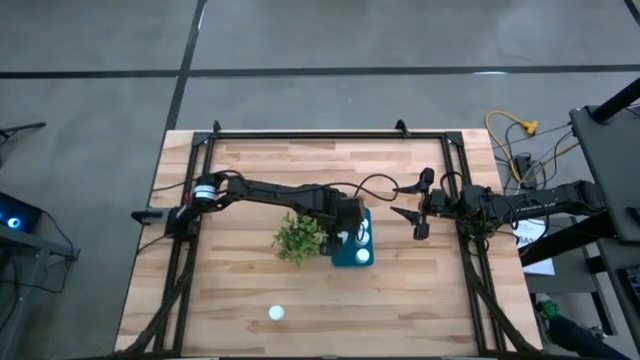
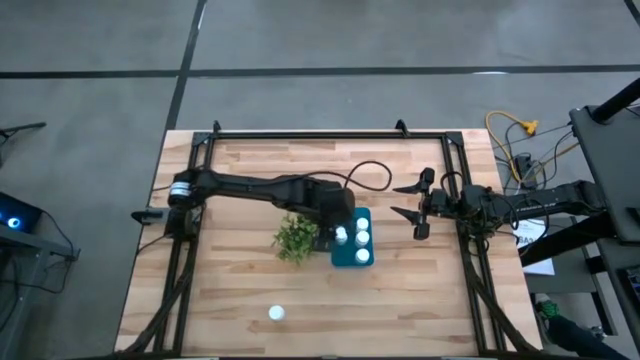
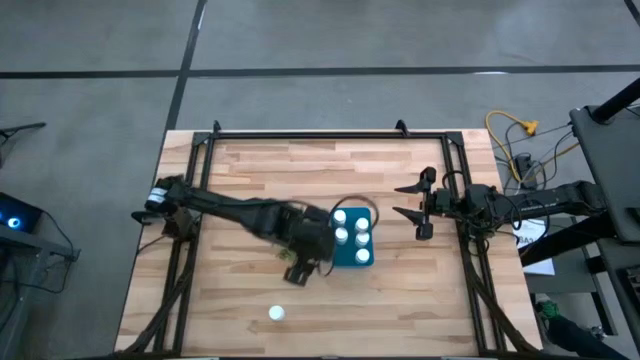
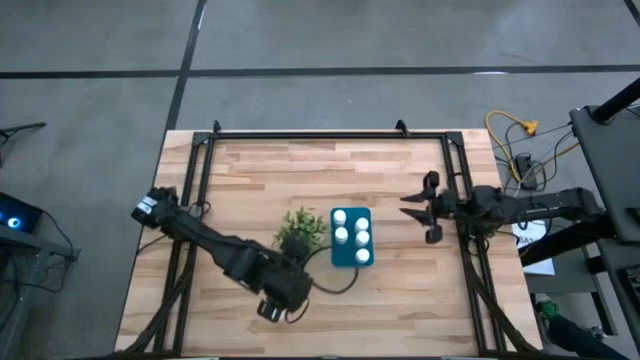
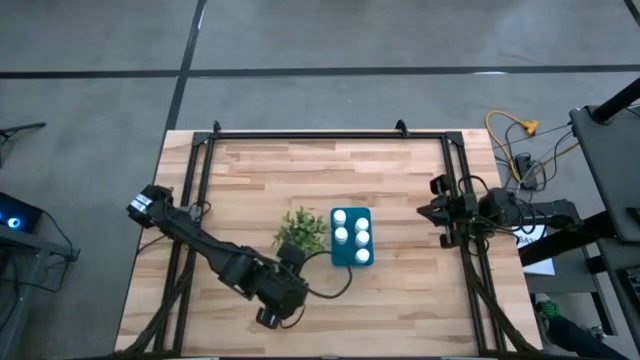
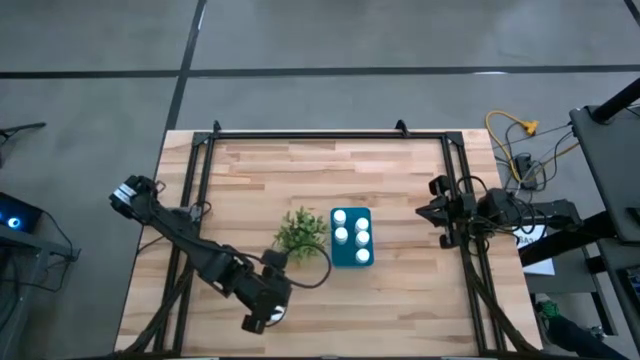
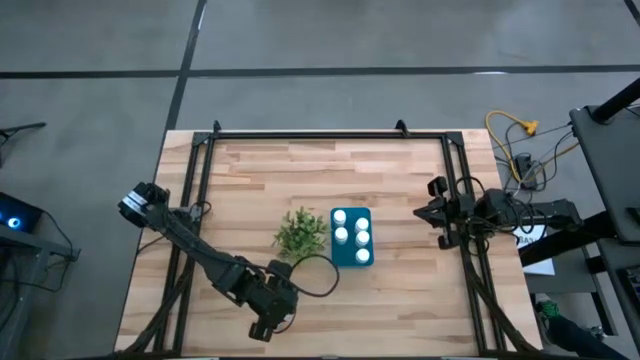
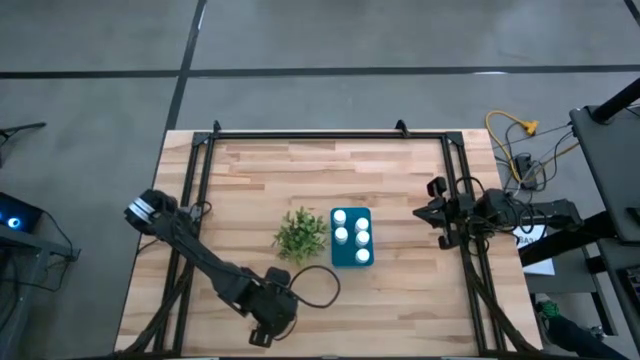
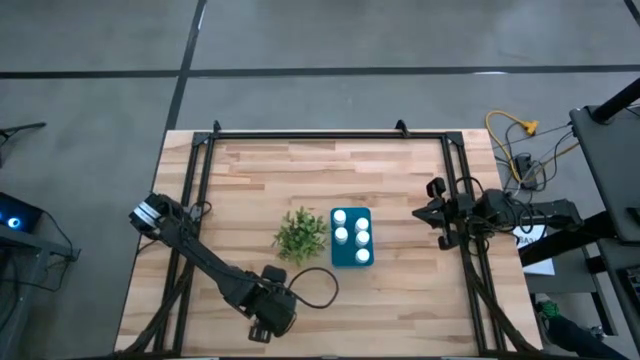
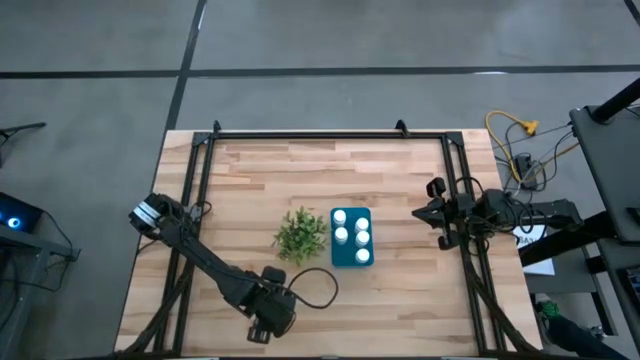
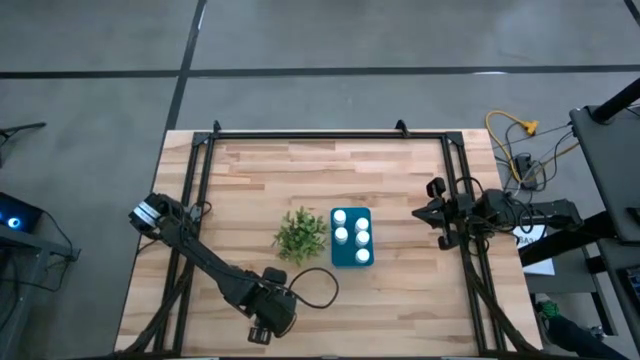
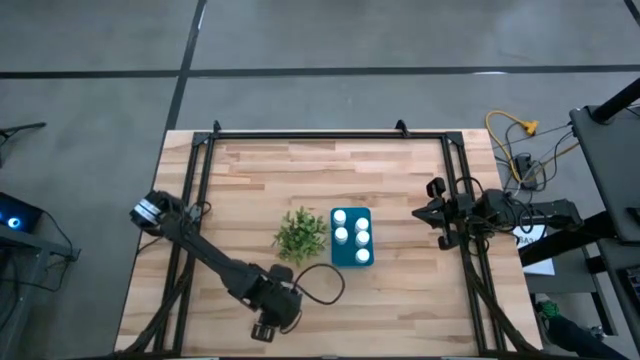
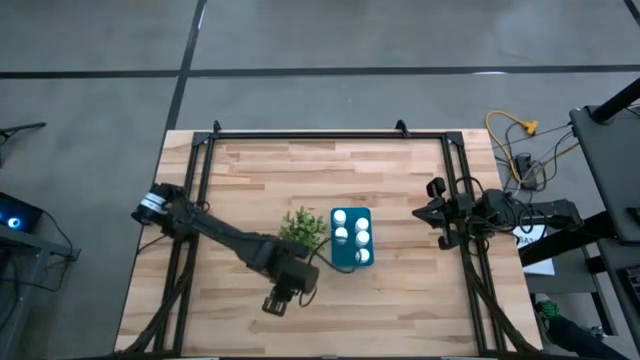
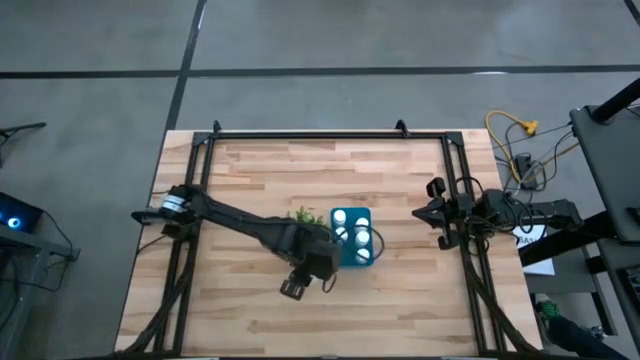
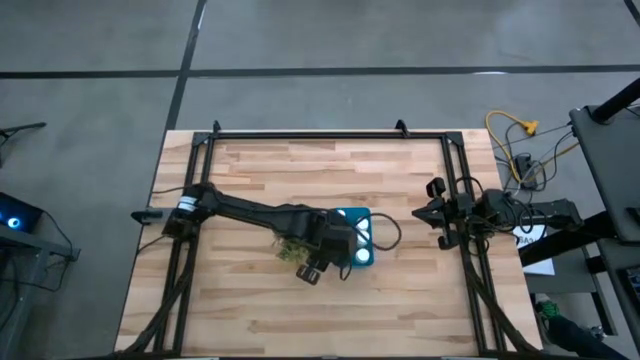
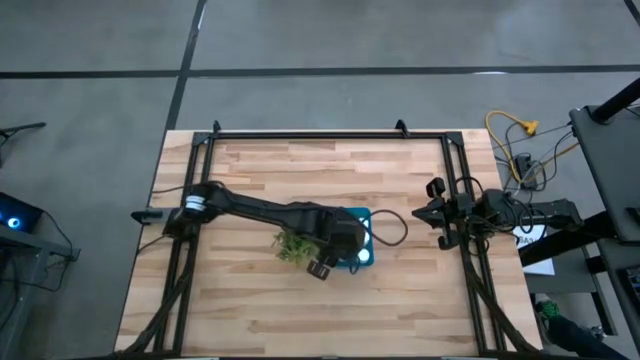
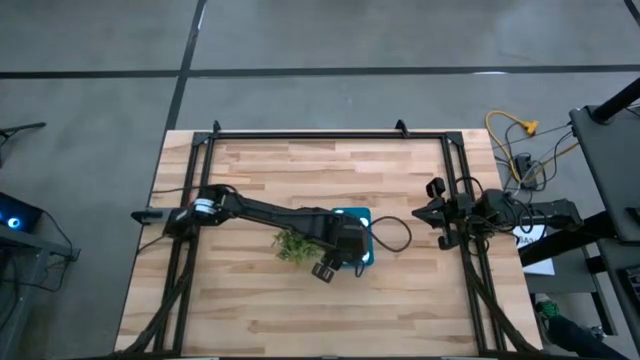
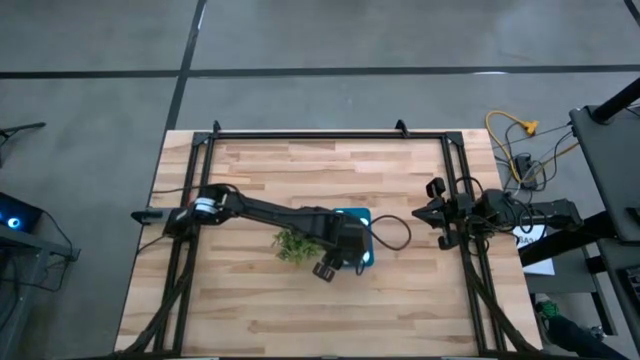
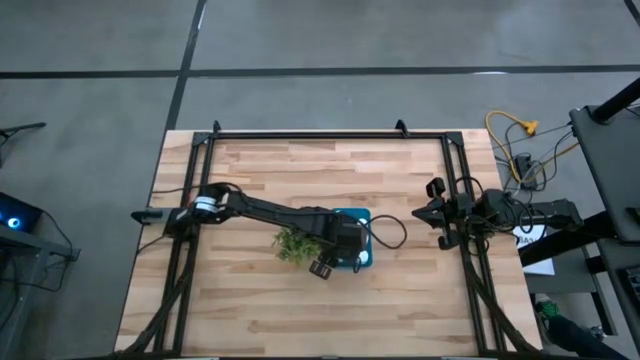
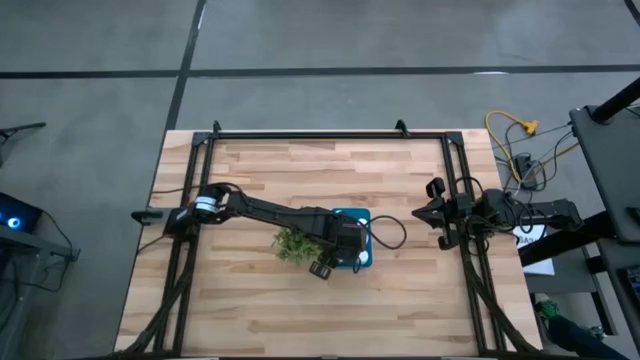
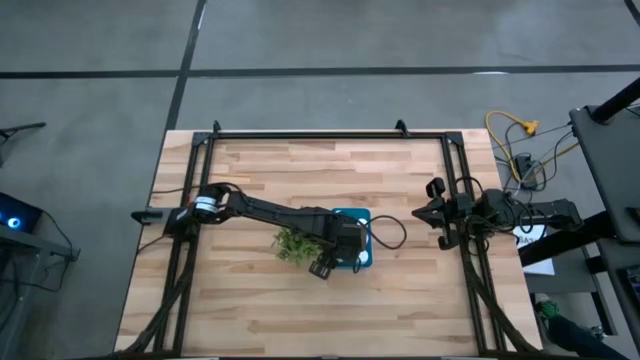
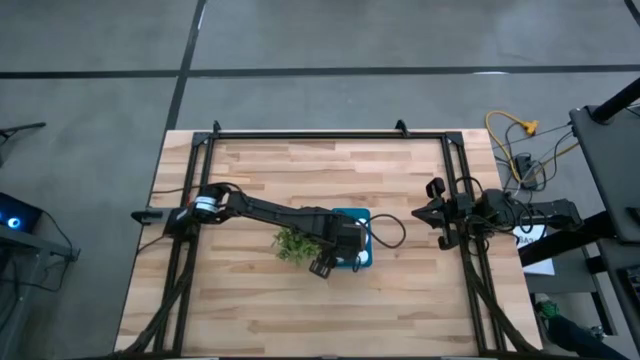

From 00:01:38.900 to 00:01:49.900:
Task: Pick and place pill bottles into a basket
Put the white medicine bottle into the blue bin

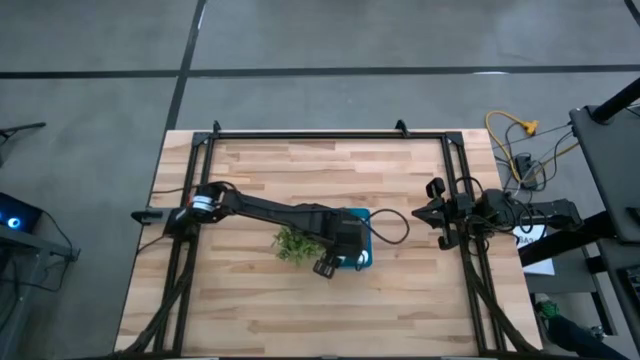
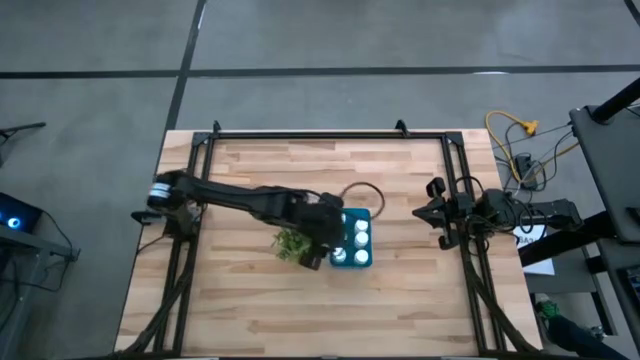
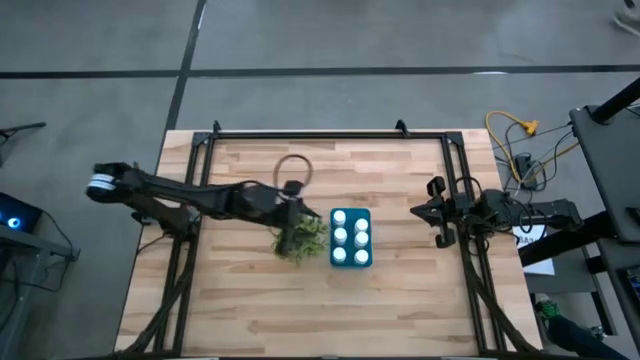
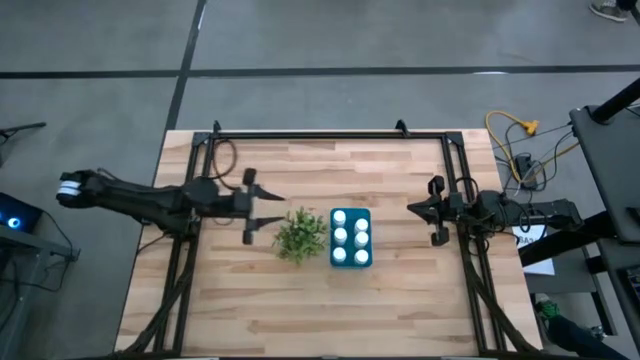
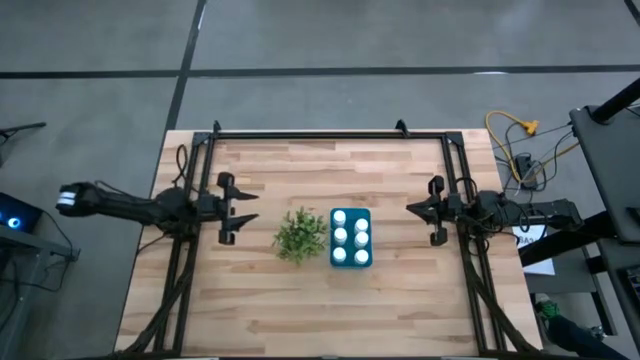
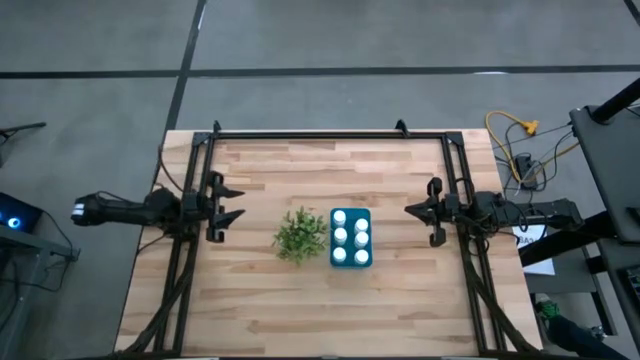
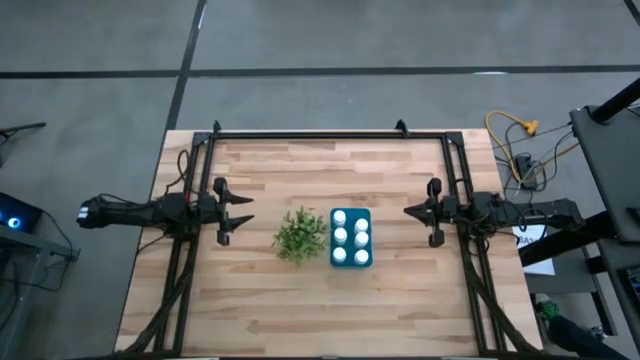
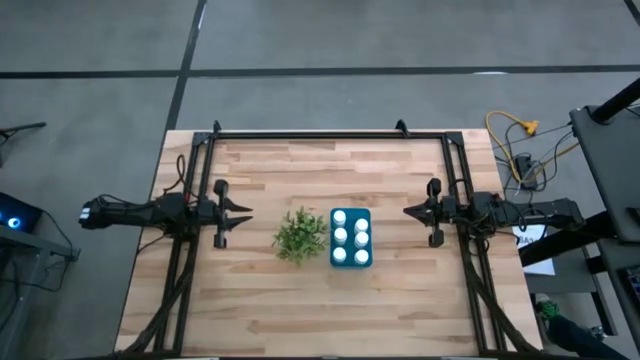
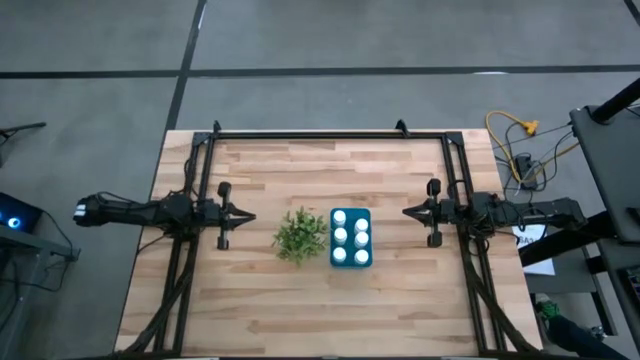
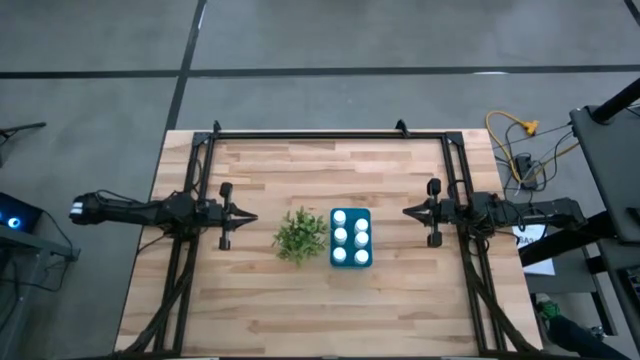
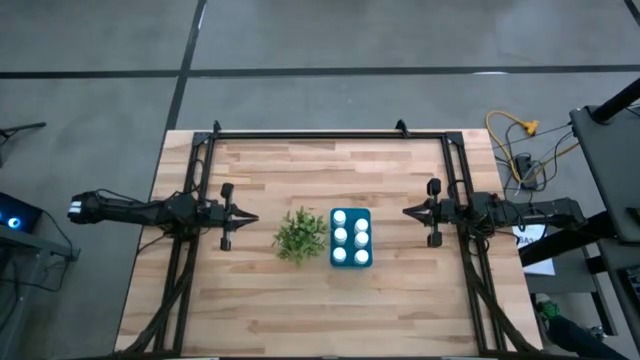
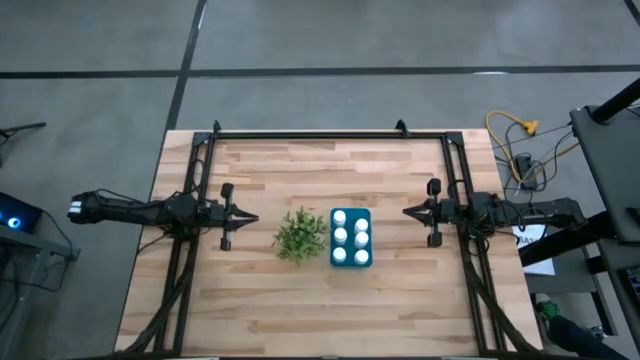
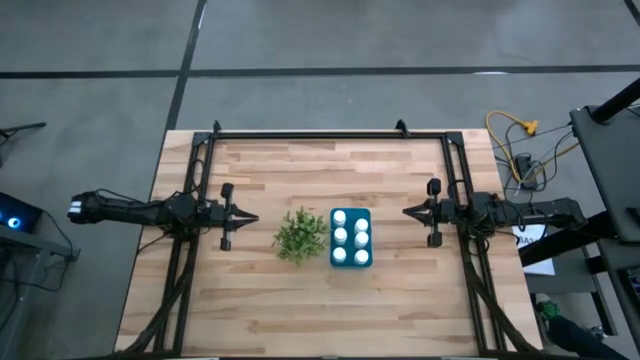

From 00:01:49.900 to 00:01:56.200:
Return to Home Position

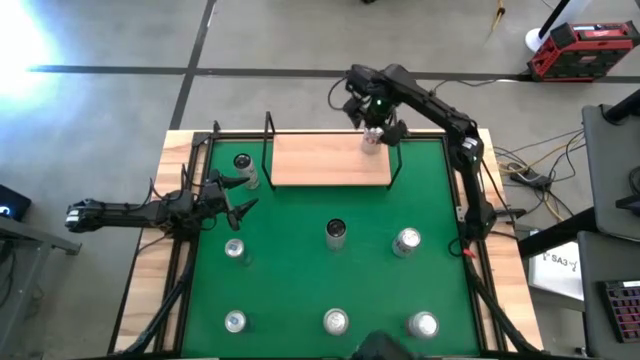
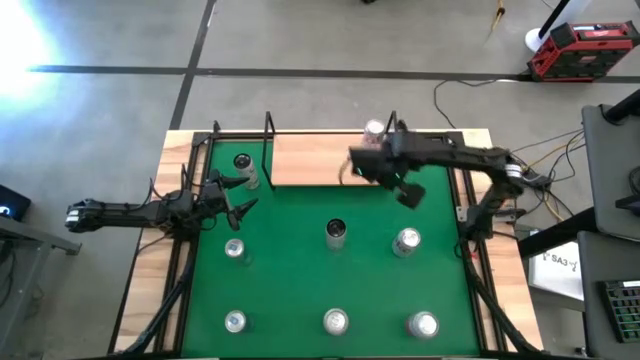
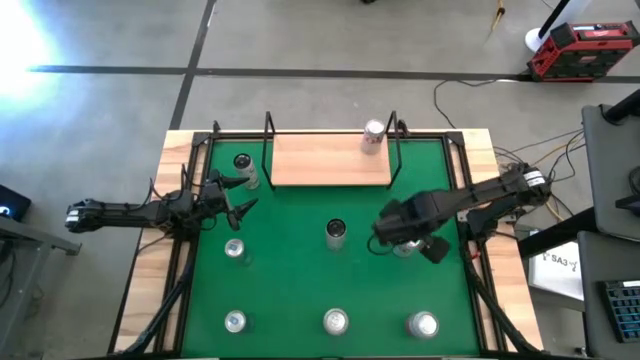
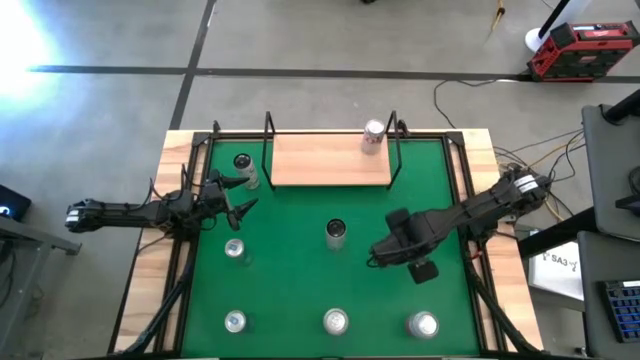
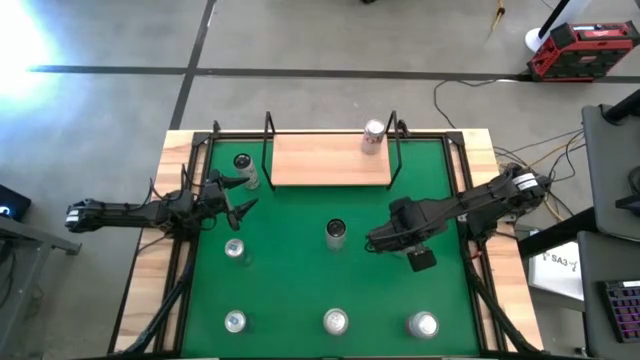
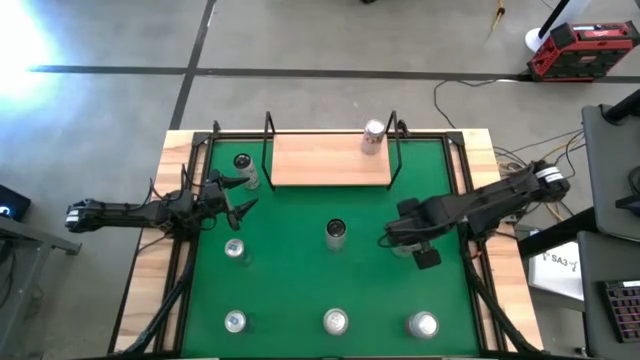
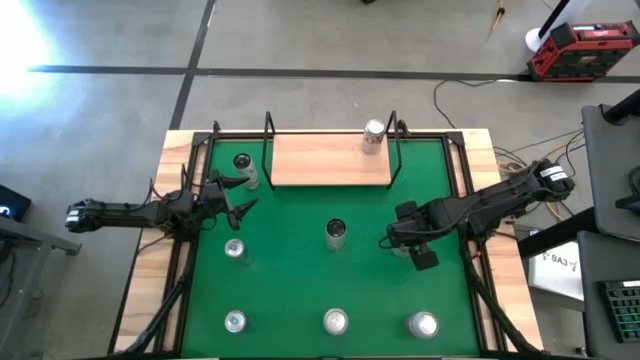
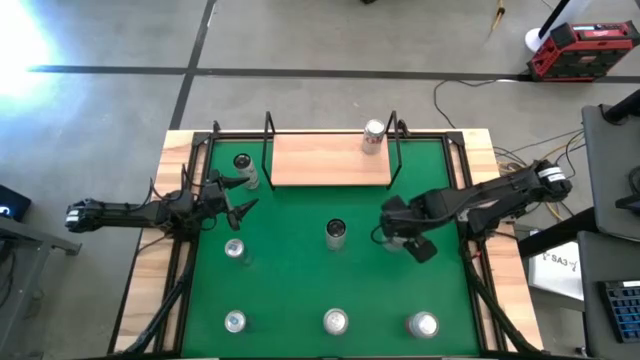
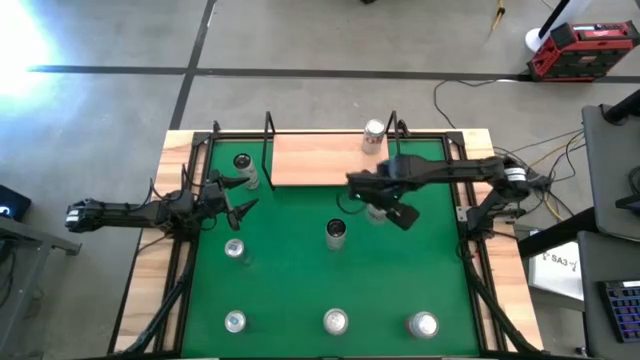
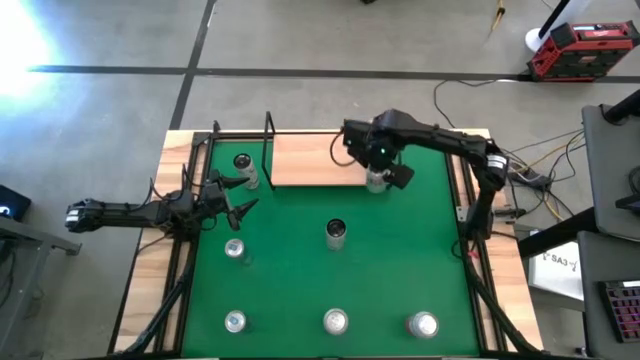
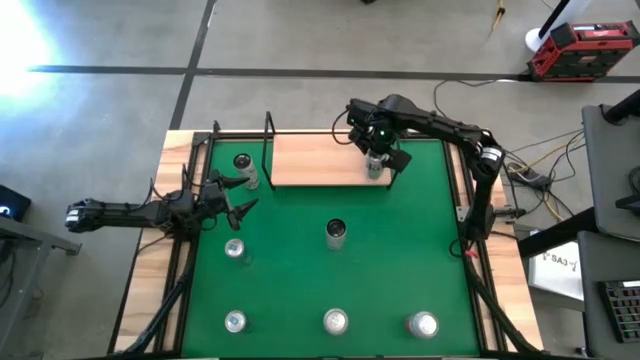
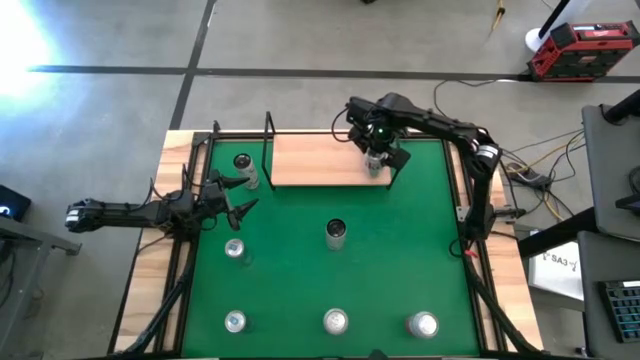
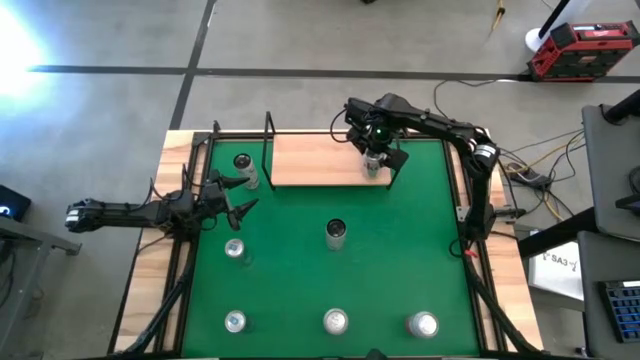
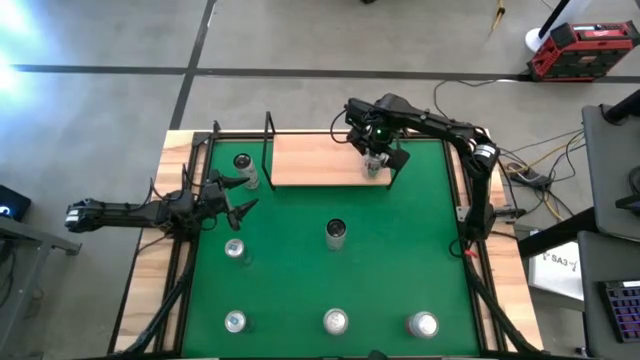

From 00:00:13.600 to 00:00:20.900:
Task: Place canned beverage on shelf
Put the silver soda can on the shelf aligned with the other silver soda can
